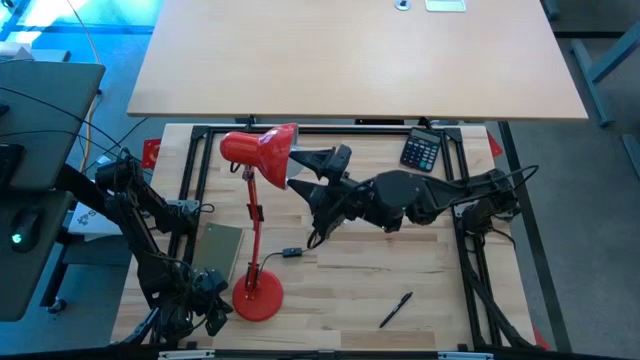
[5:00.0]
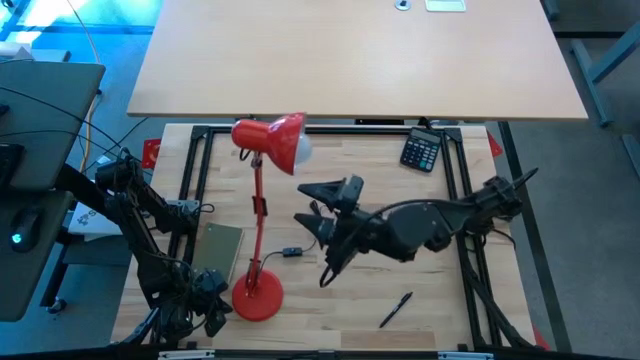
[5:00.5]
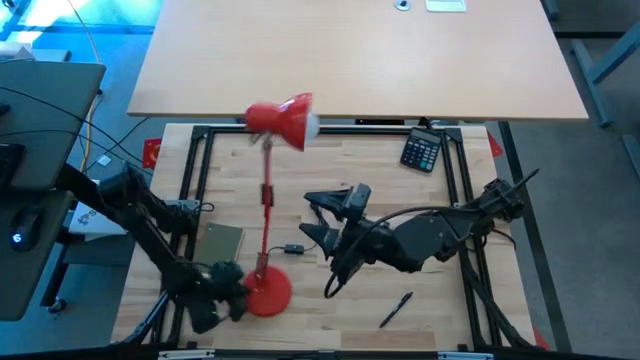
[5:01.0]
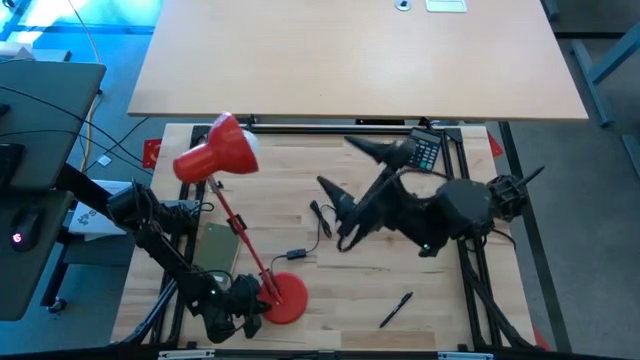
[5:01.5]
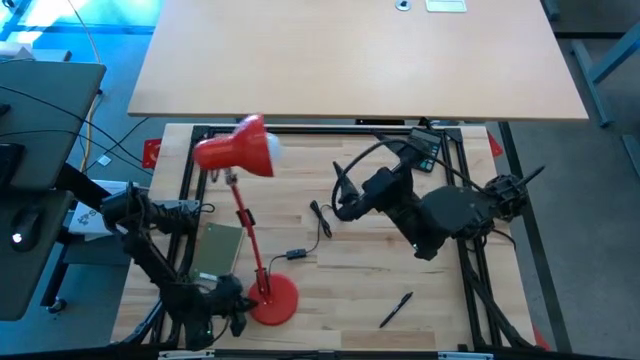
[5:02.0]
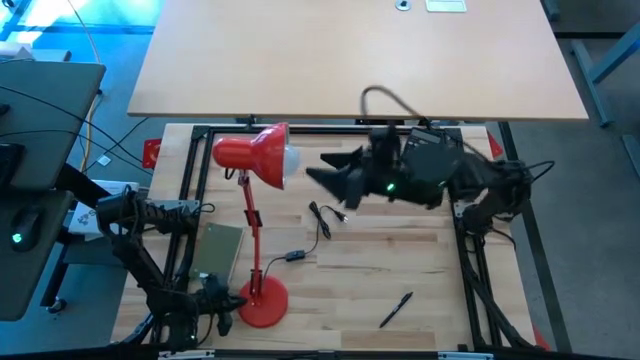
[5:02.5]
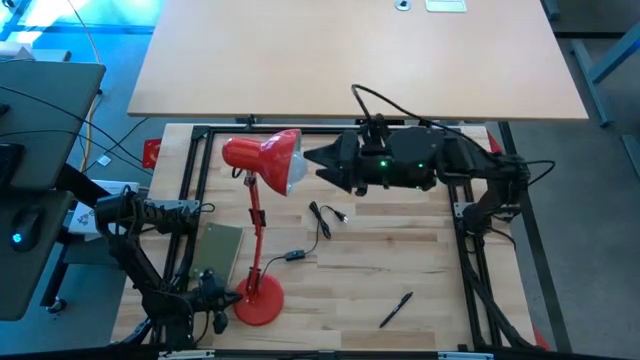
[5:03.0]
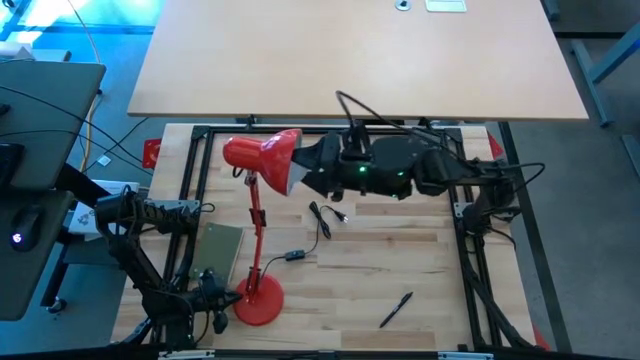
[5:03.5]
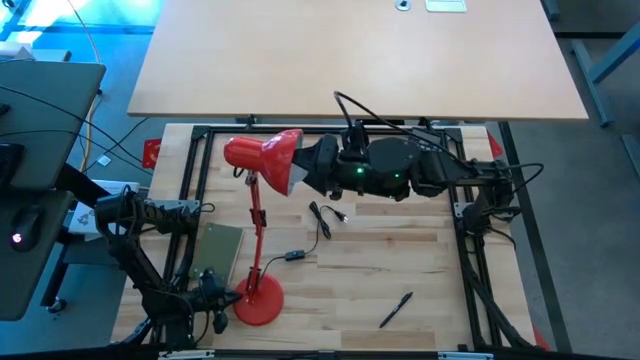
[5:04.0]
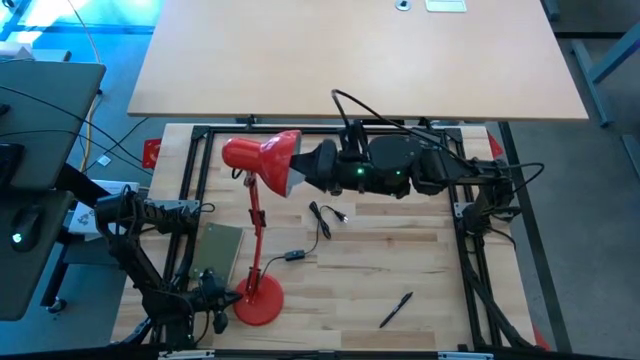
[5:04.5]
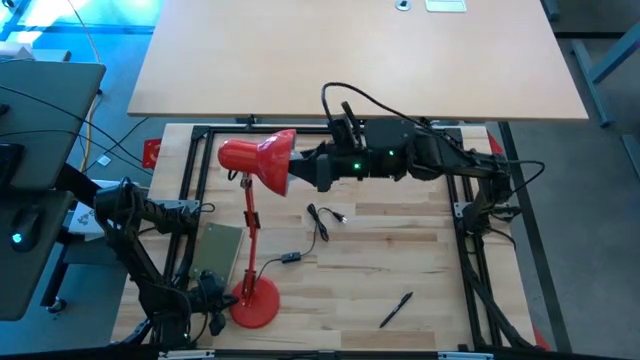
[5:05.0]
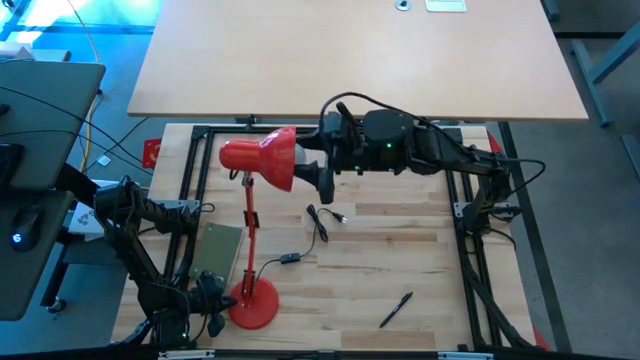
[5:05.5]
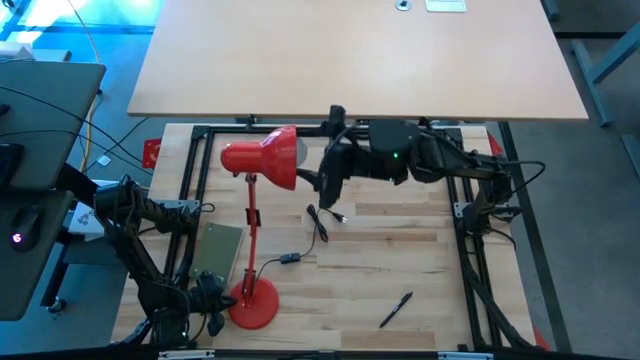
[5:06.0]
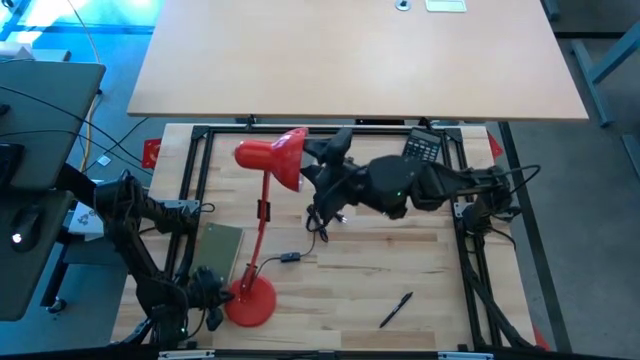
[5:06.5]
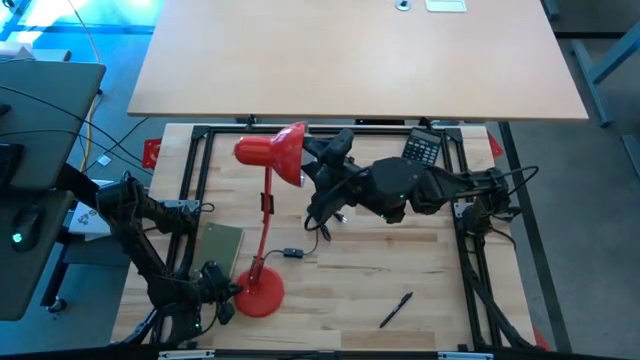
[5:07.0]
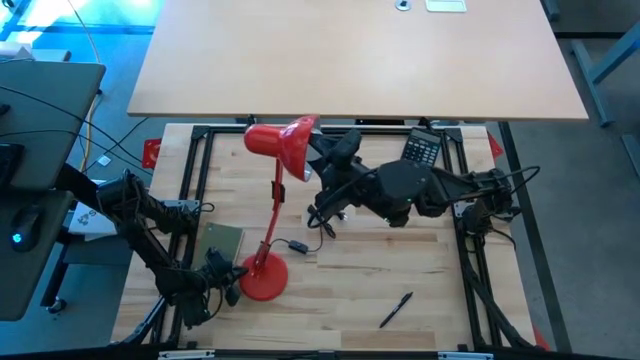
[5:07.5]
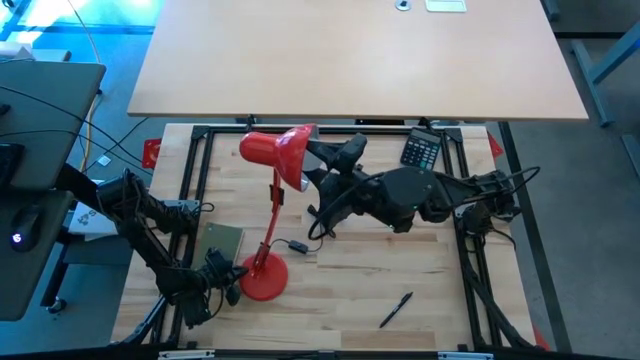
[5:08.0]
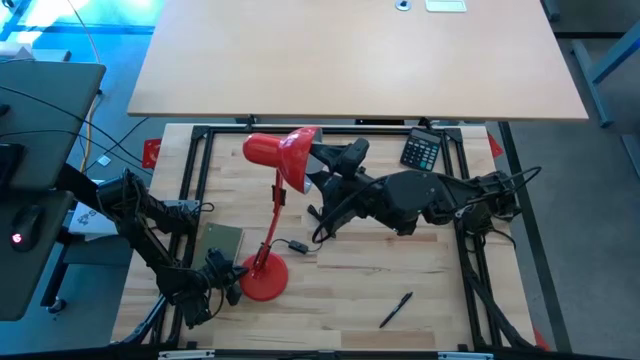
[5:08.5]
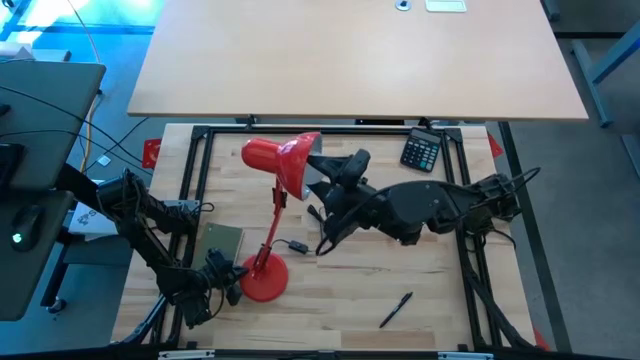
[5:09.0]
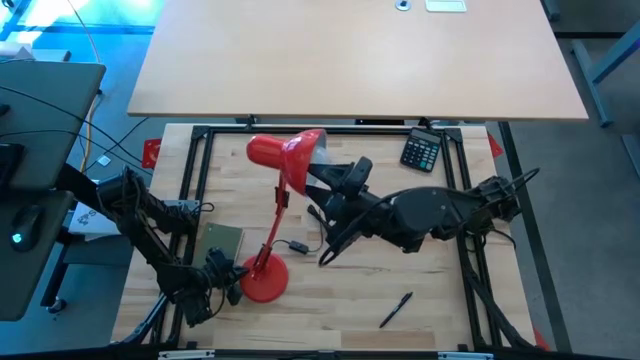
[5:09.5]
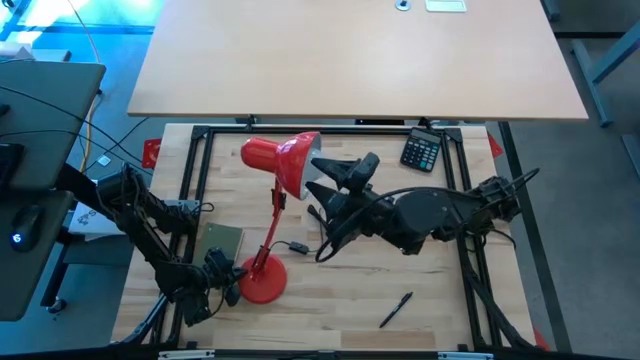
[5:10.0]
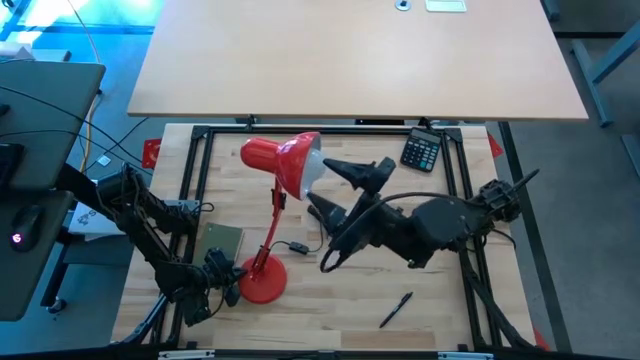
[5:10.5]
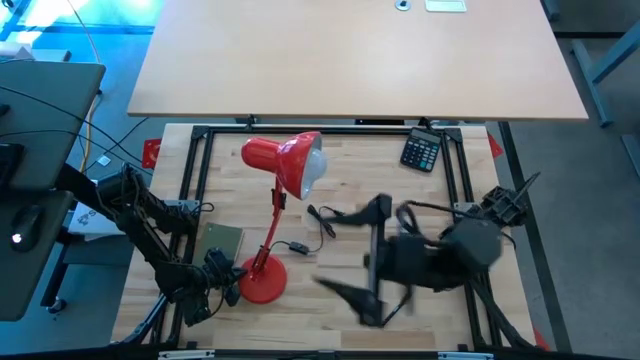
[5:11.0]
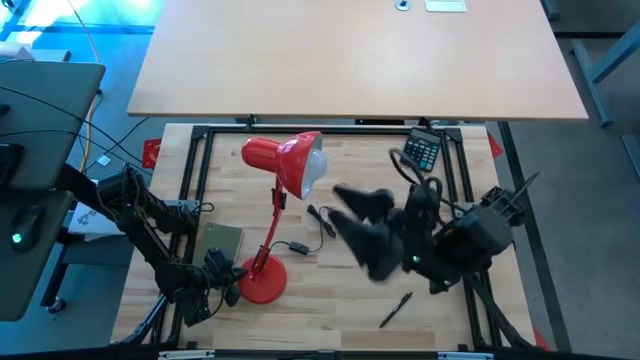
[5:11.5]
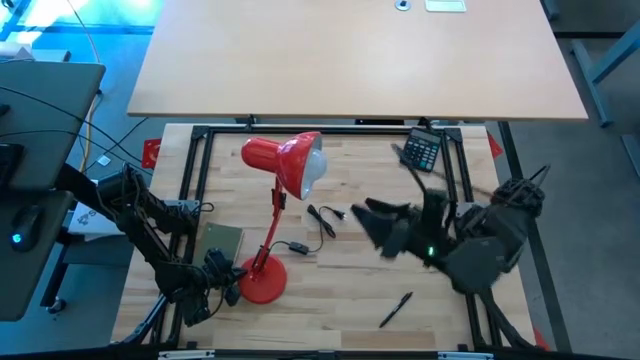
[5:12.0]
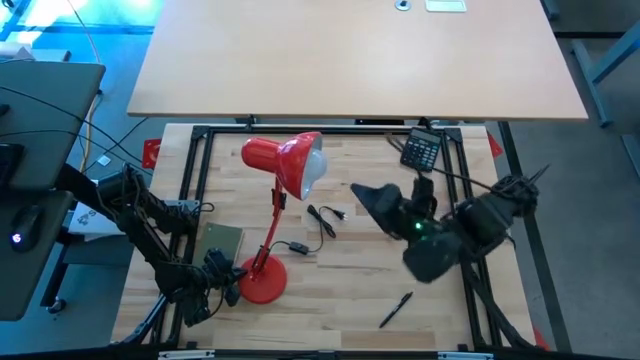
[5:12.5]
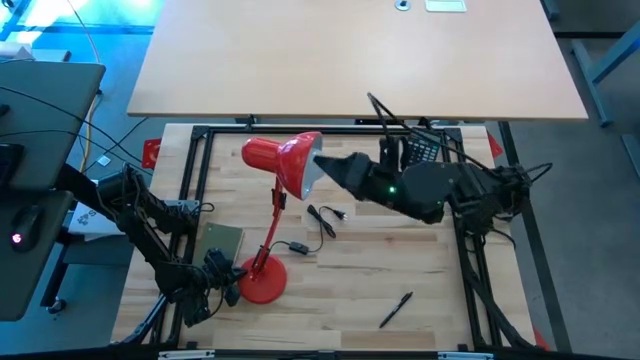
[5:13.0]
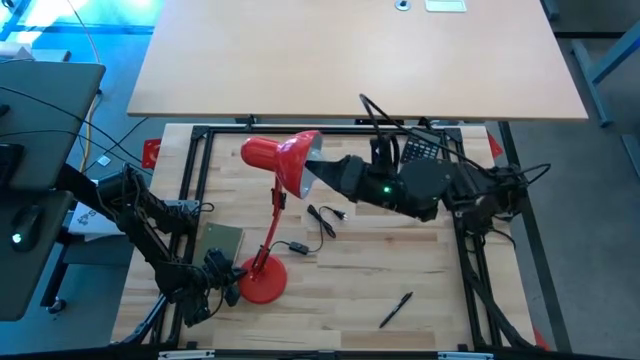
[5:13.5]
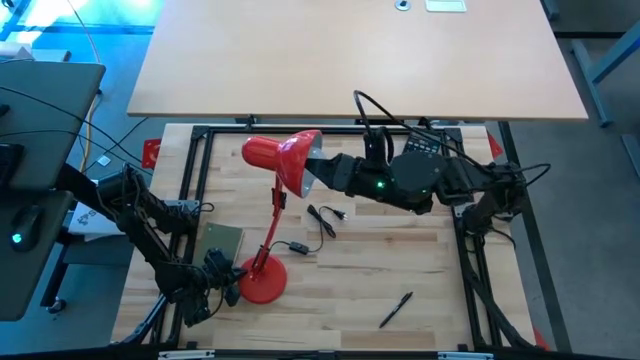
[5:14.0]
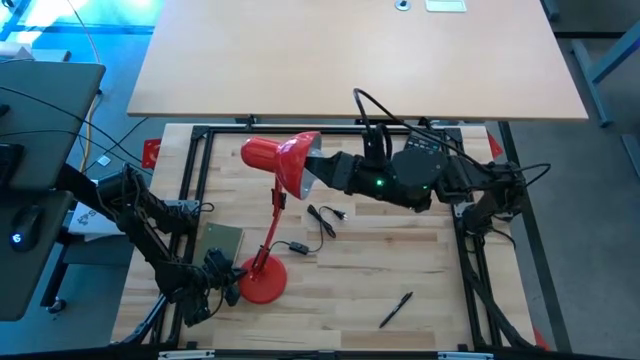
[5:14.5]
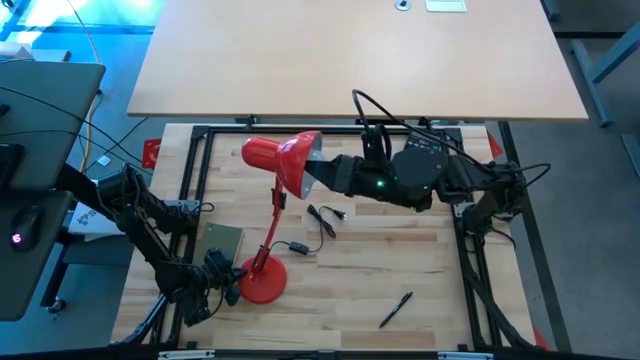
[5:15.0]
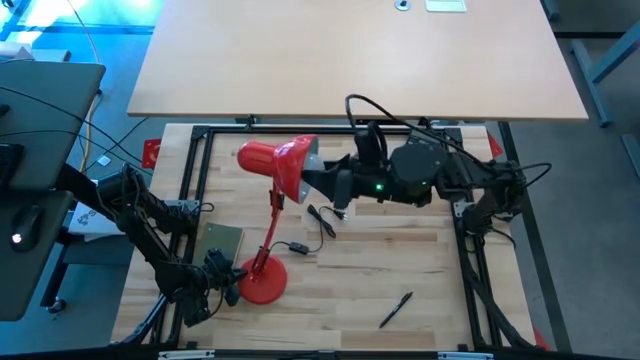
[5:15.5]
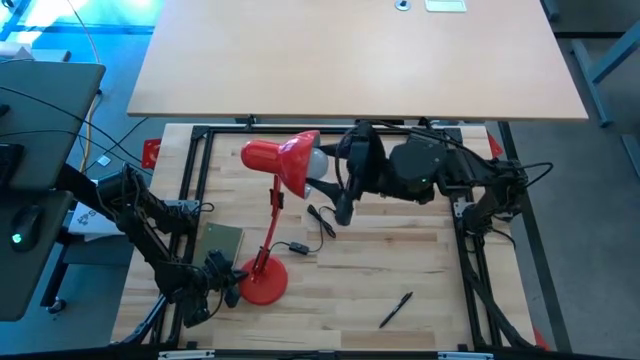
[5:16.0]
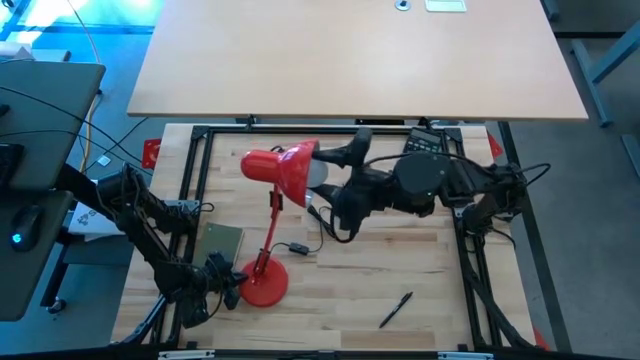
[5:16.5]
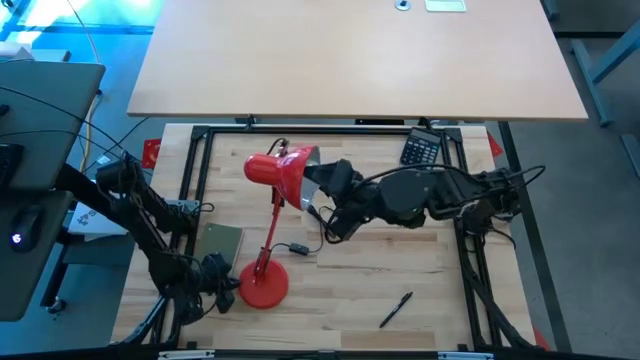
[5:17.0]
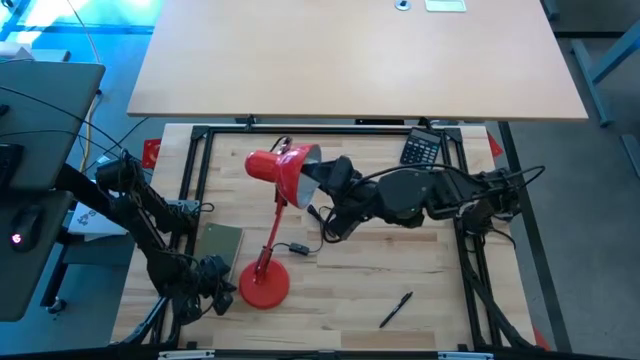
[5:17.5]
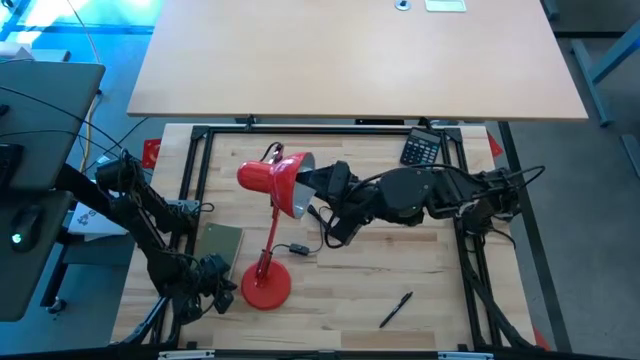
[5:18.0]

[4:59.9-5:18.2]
Task: Screw lightbulb
Remove the white lightbulb from the red lamp
